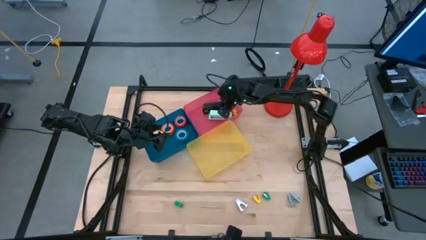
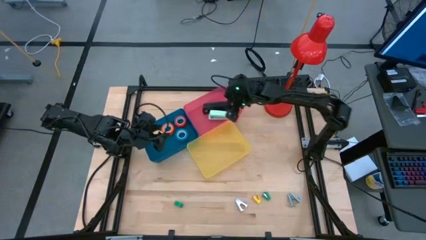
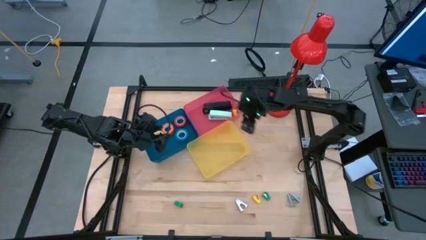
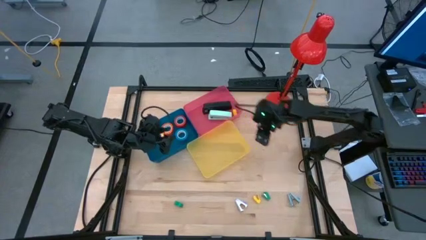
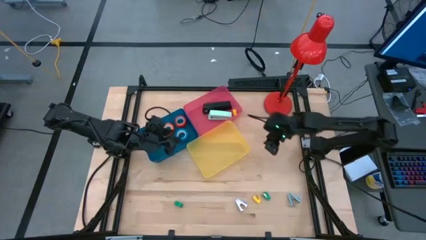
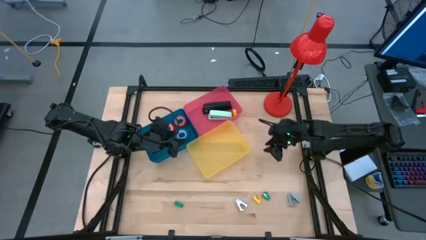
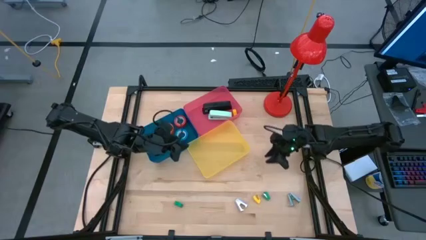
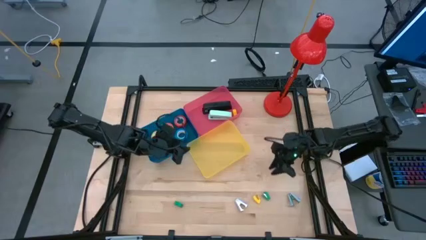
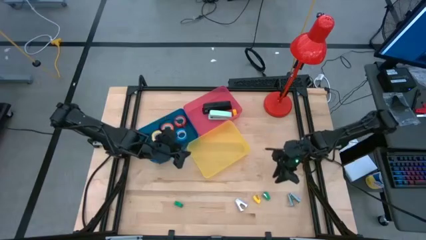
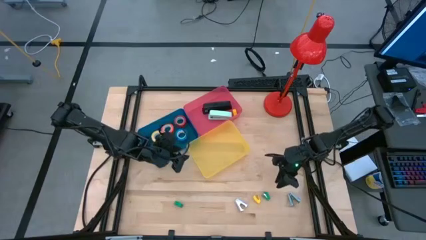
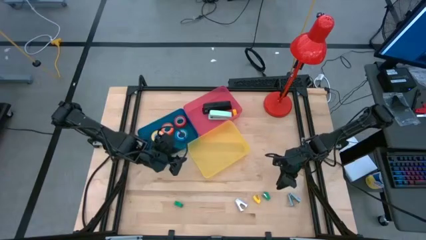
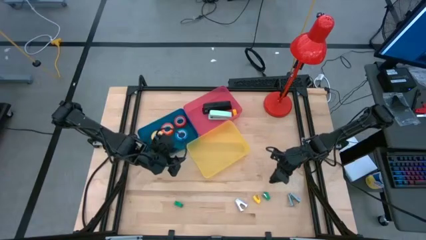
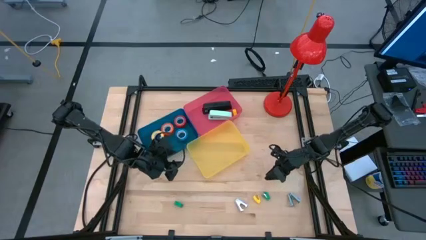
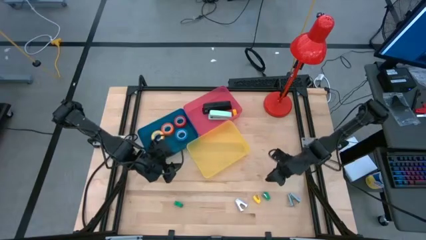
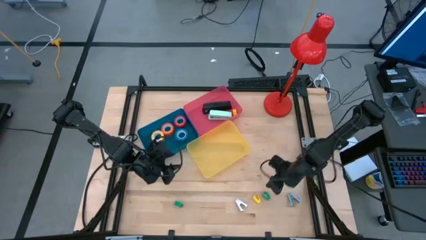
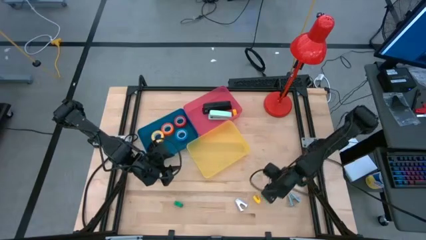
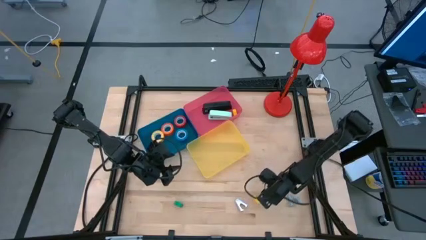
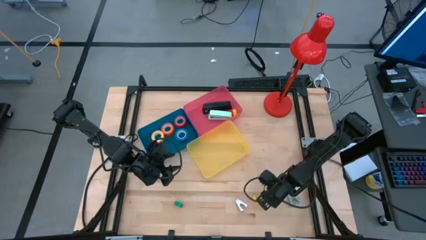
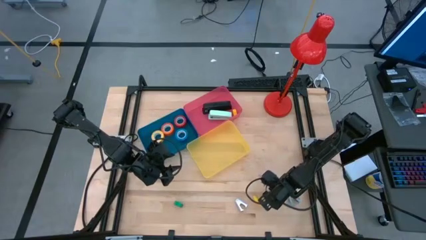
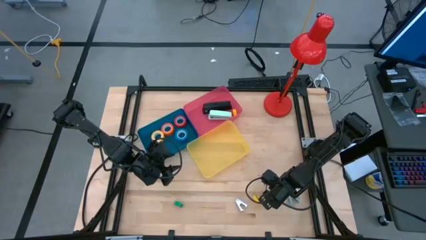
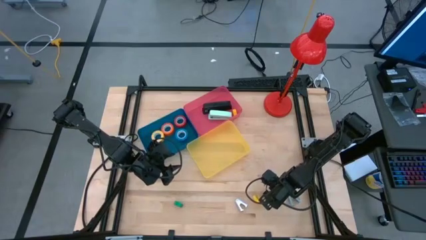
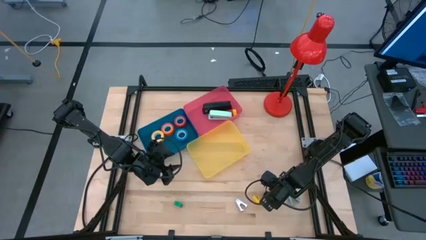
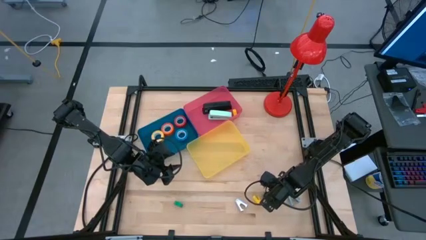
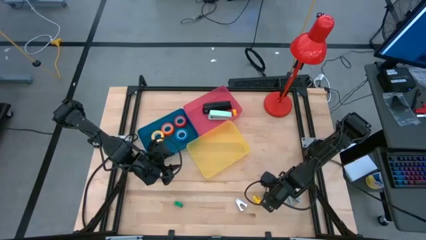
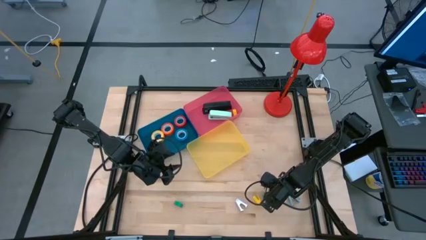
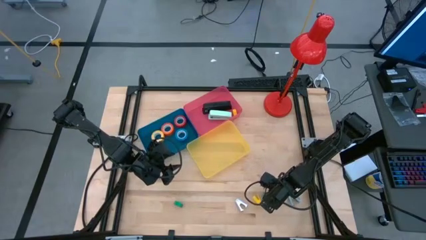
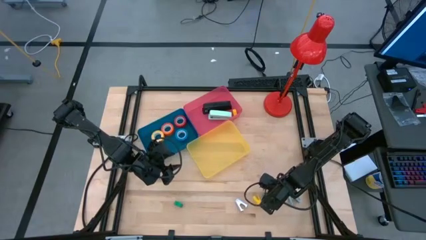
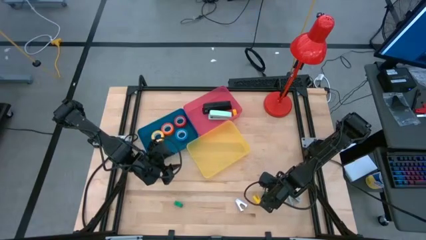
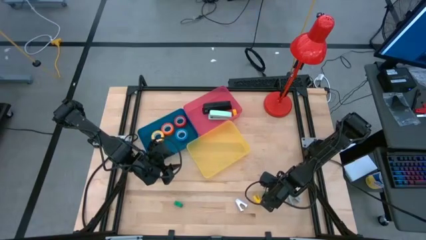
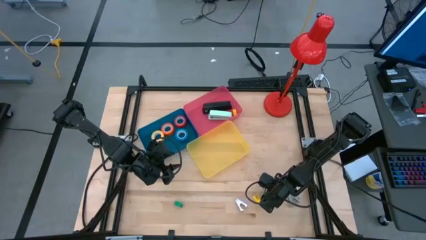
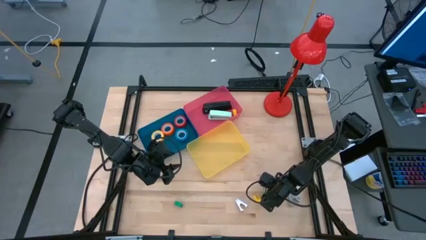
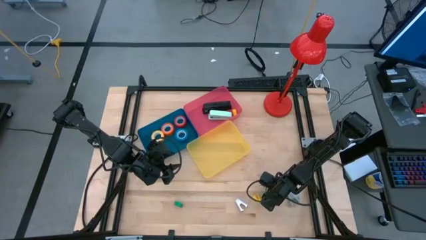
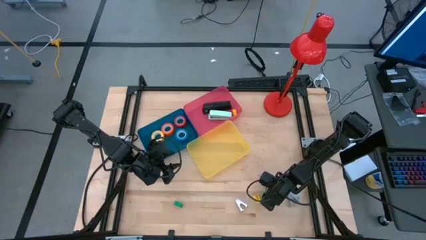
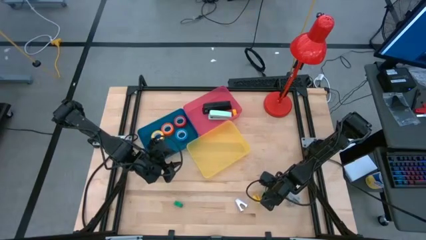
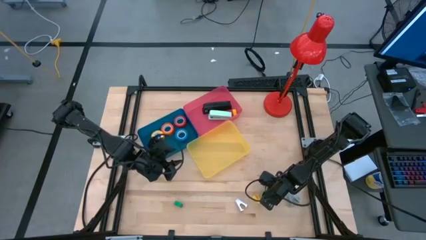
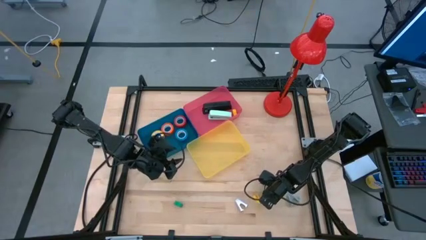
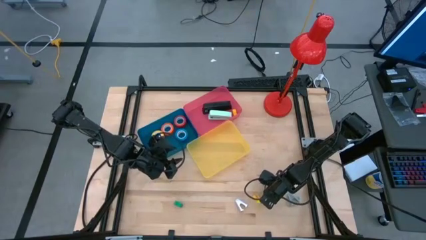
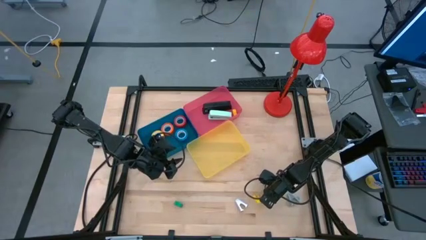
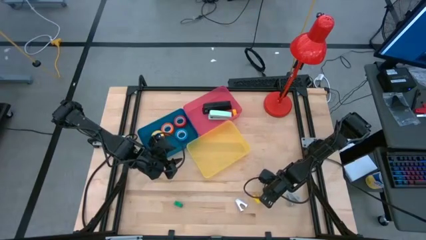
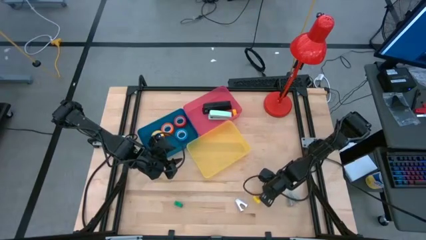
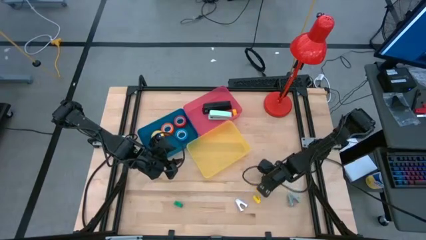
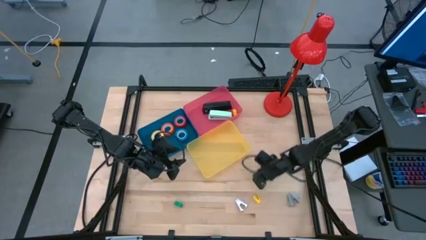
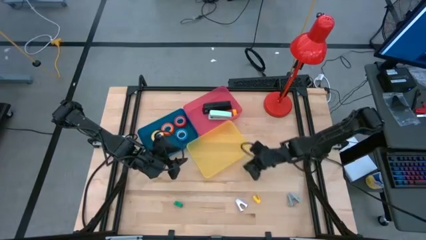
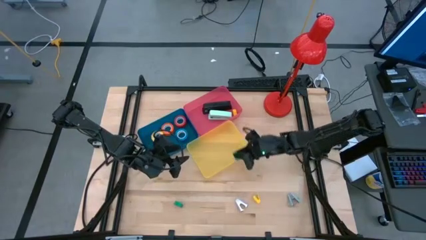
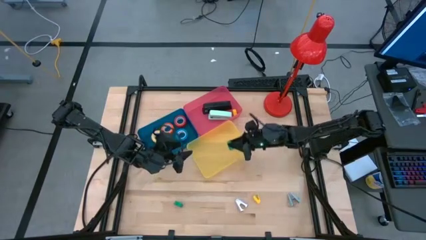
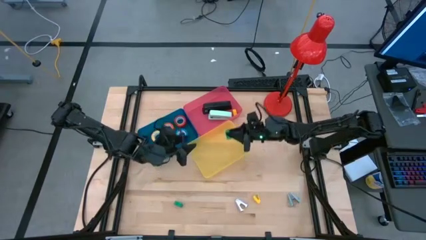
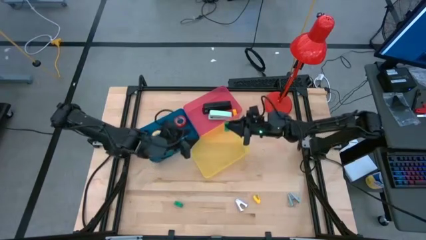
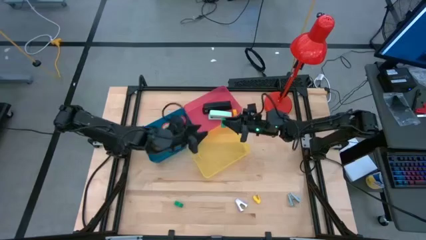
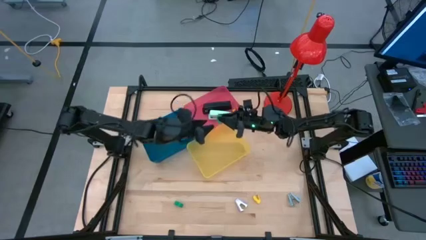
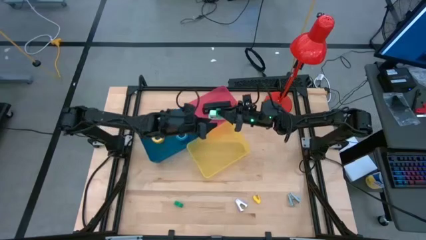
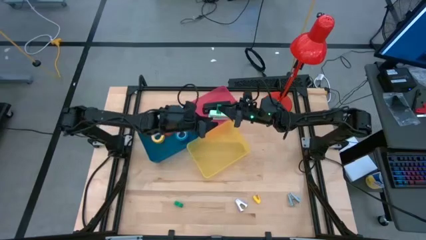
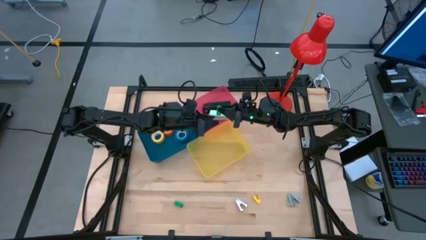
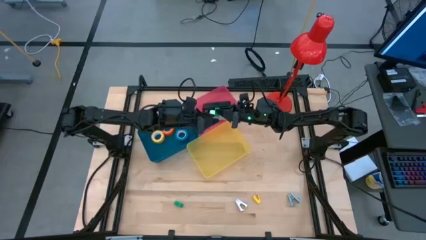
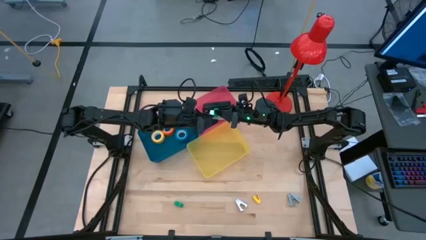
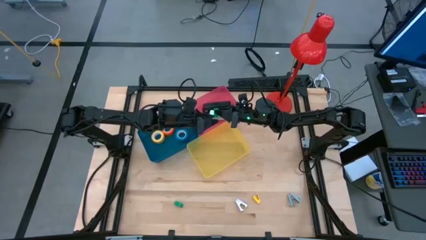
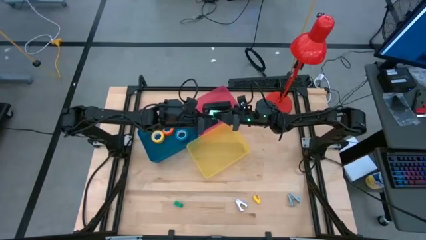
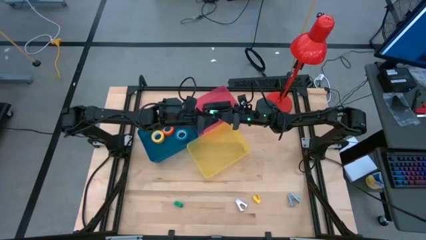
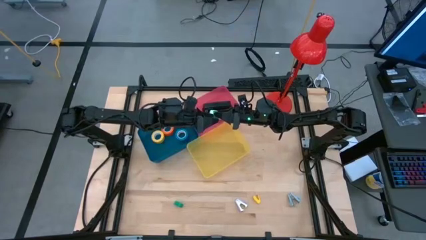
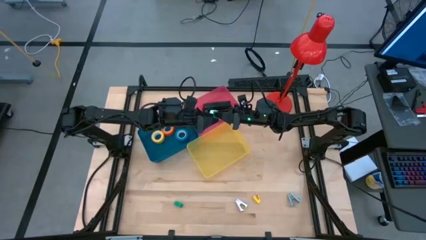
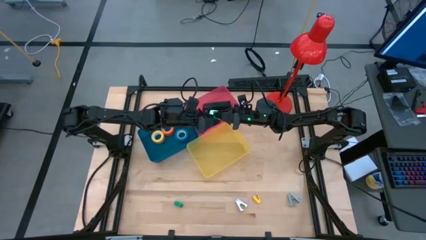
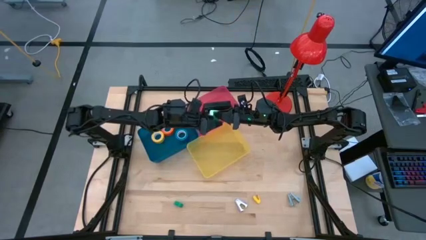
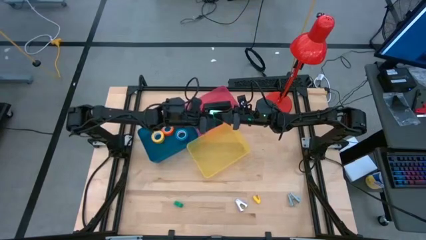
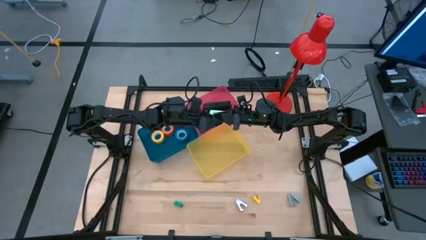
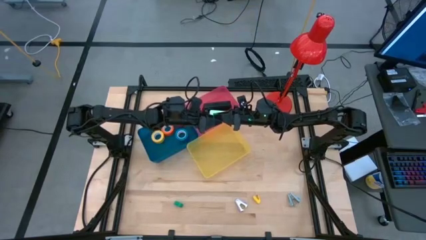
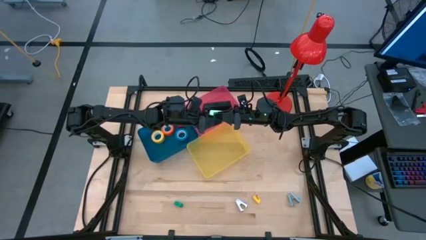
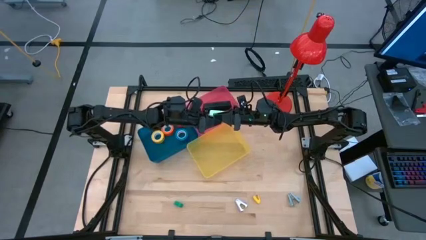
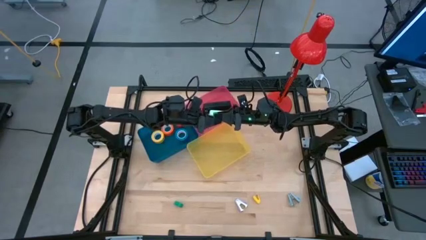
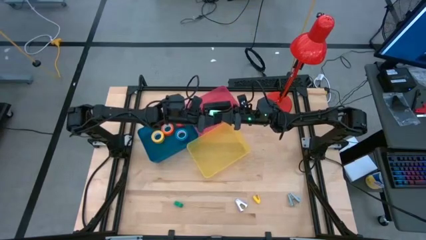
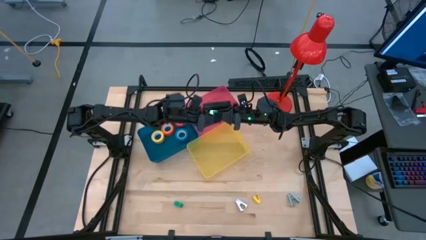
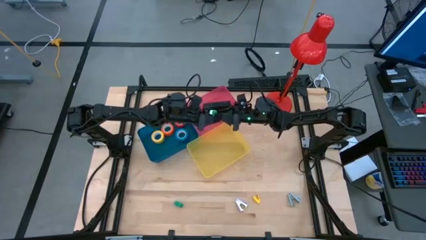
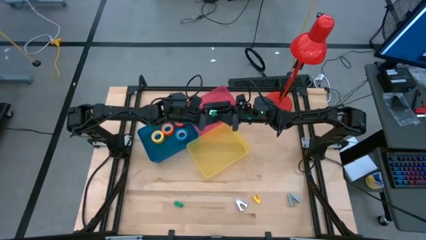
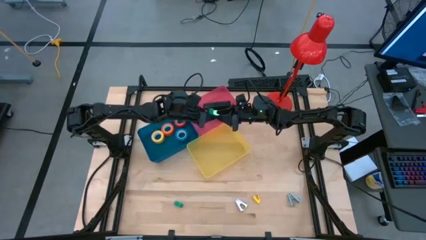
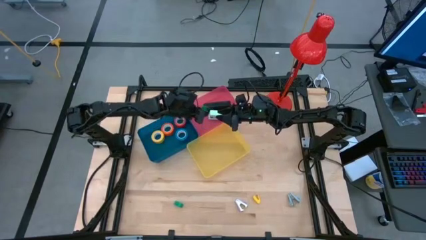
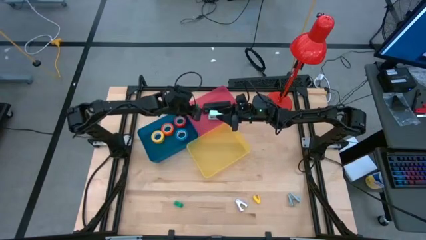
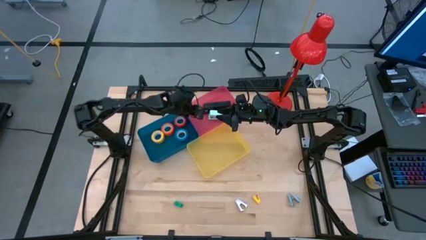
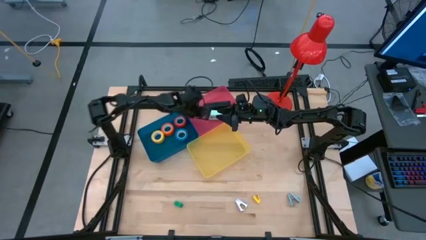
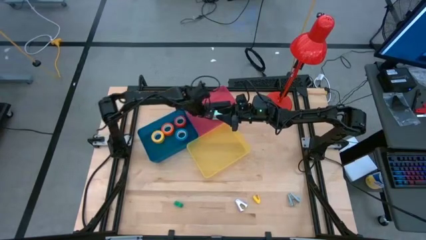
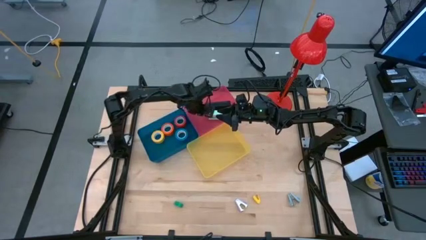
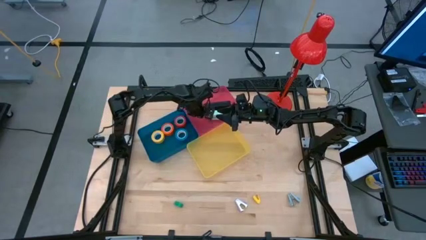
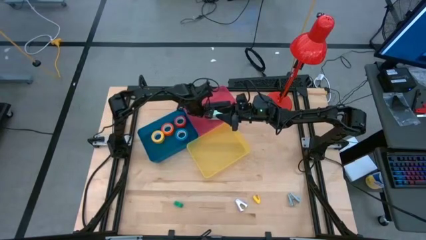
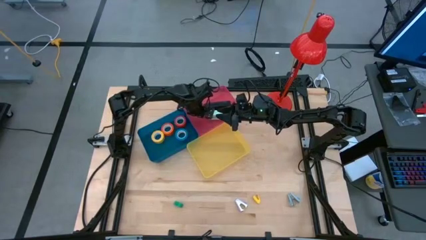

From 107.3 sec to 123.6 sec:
Task: Pick and place Stapler, Stapler remover, tape
Put the right green stapler into the pink bin
